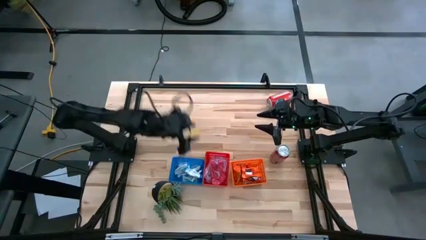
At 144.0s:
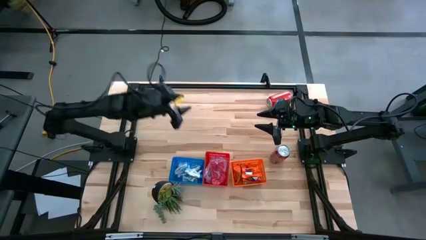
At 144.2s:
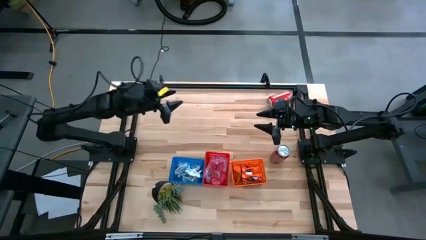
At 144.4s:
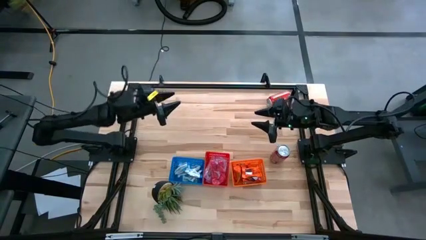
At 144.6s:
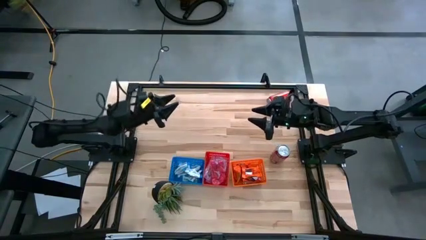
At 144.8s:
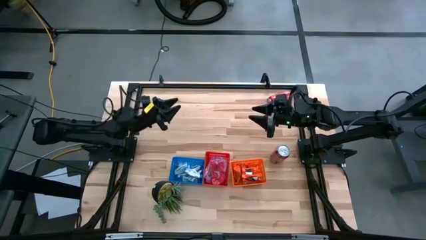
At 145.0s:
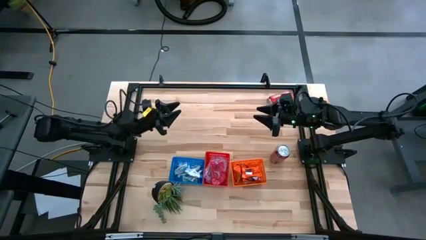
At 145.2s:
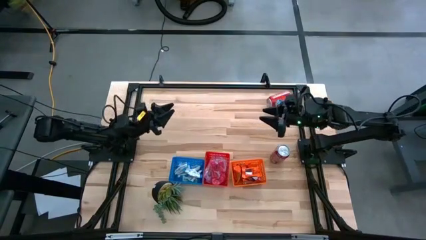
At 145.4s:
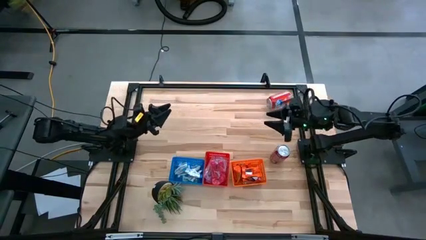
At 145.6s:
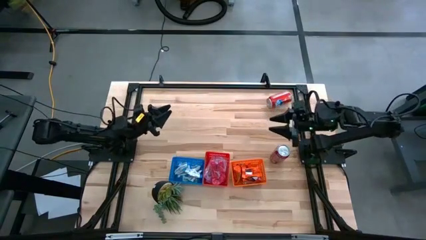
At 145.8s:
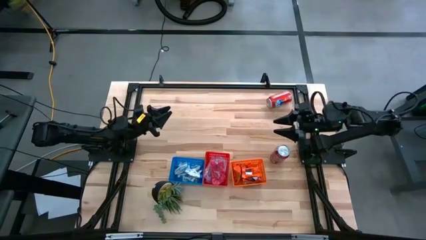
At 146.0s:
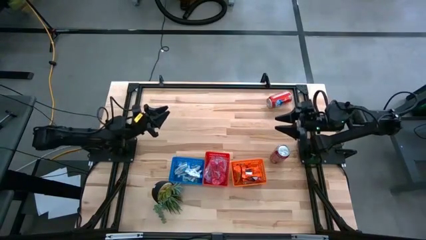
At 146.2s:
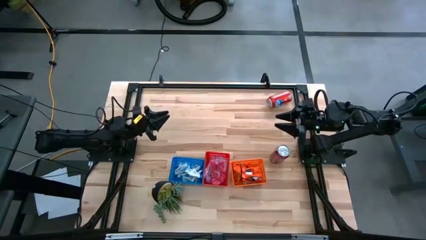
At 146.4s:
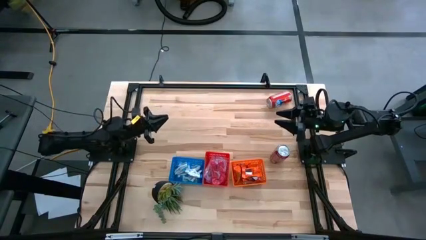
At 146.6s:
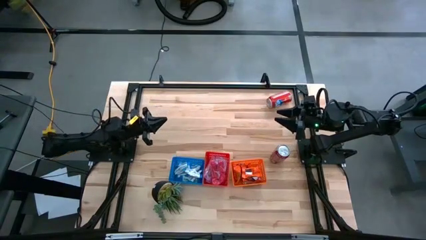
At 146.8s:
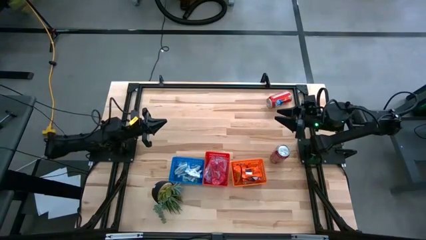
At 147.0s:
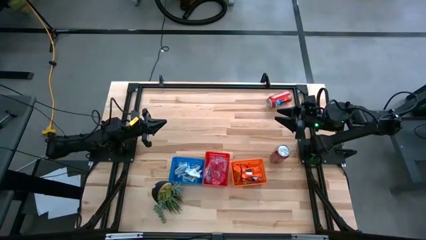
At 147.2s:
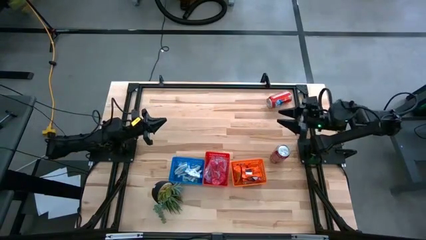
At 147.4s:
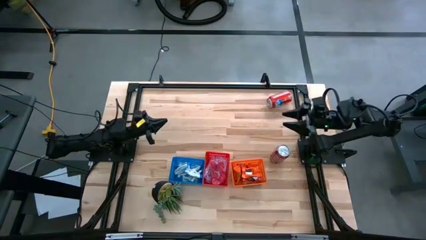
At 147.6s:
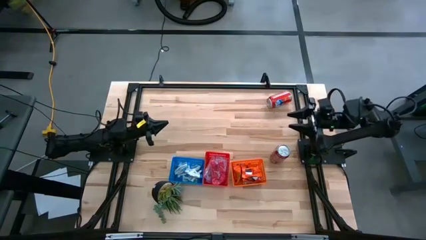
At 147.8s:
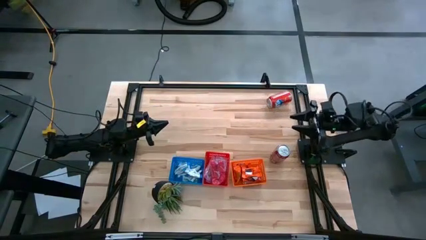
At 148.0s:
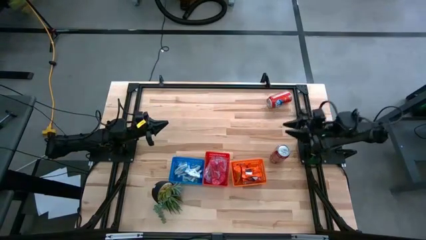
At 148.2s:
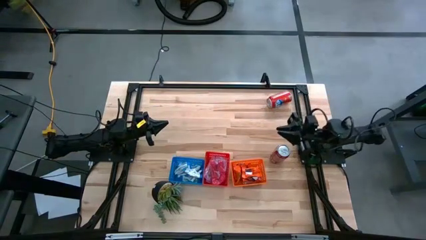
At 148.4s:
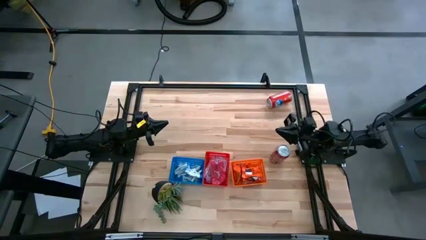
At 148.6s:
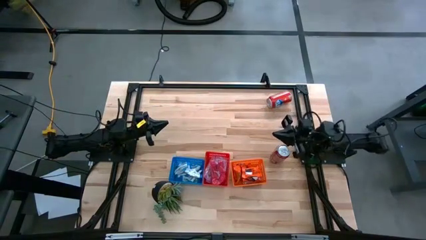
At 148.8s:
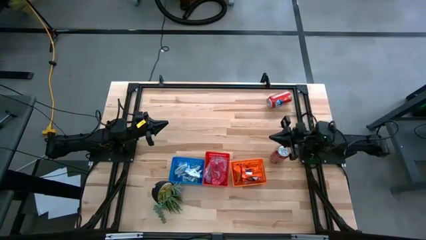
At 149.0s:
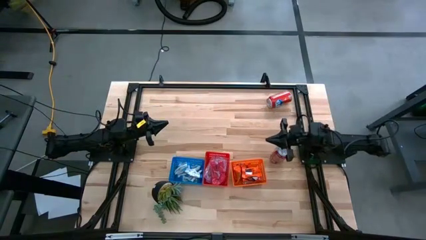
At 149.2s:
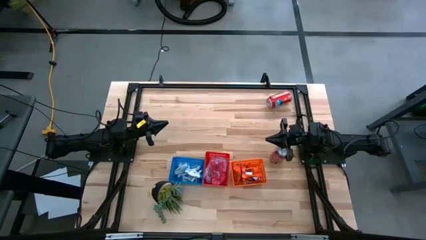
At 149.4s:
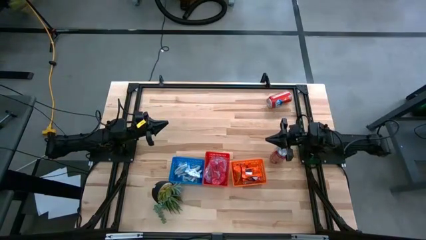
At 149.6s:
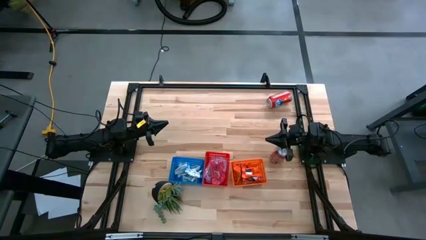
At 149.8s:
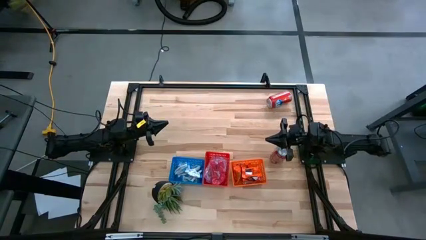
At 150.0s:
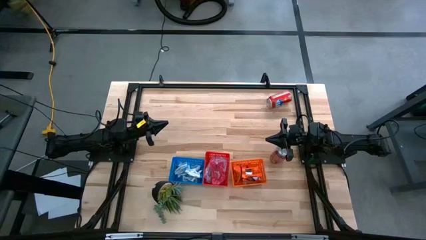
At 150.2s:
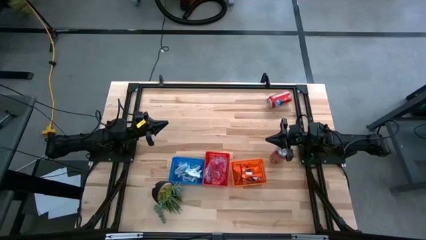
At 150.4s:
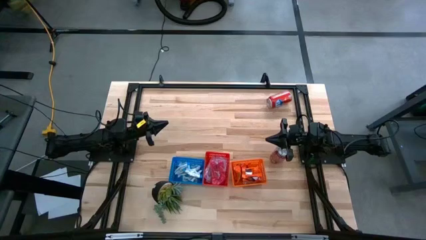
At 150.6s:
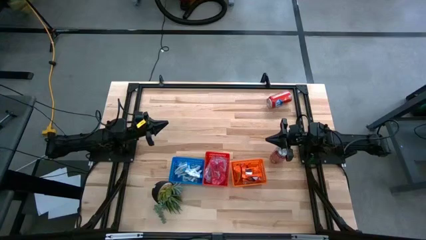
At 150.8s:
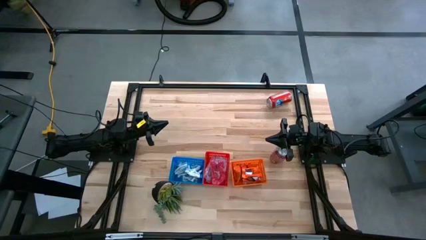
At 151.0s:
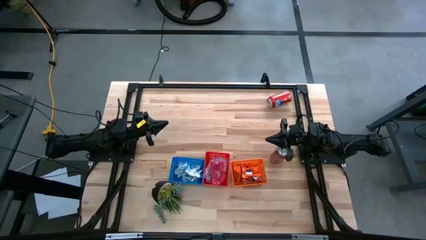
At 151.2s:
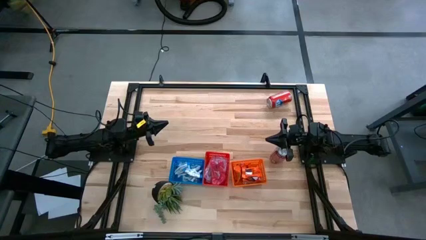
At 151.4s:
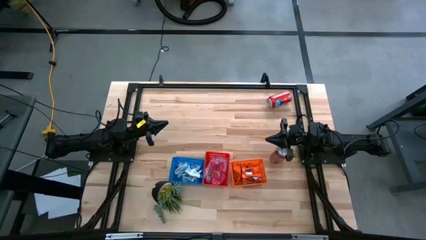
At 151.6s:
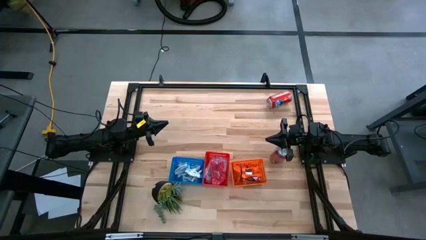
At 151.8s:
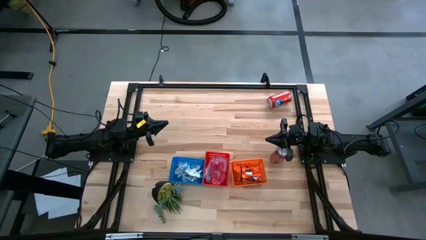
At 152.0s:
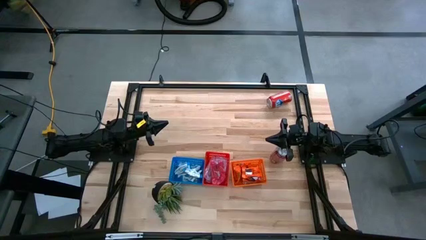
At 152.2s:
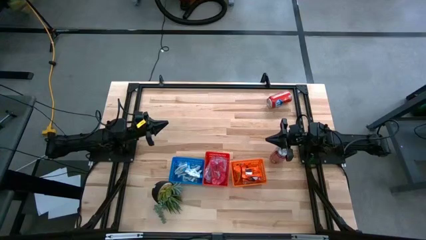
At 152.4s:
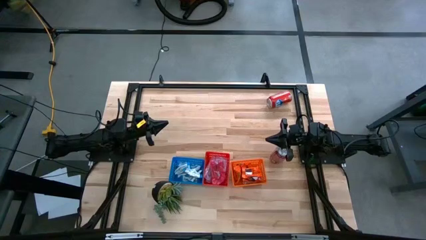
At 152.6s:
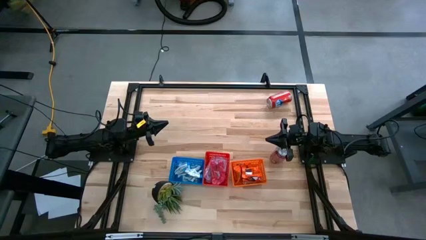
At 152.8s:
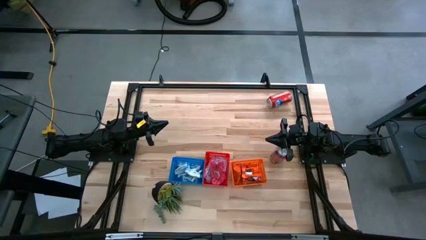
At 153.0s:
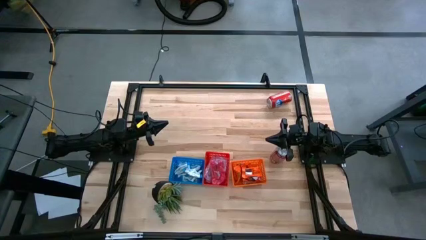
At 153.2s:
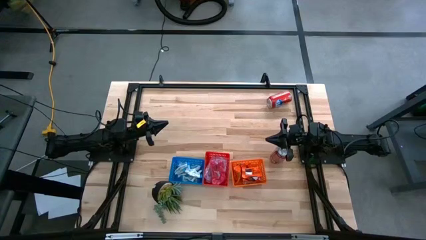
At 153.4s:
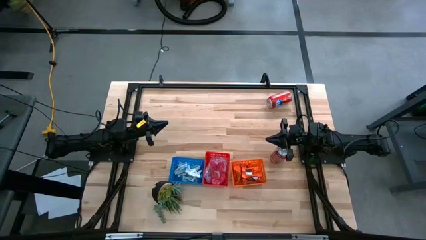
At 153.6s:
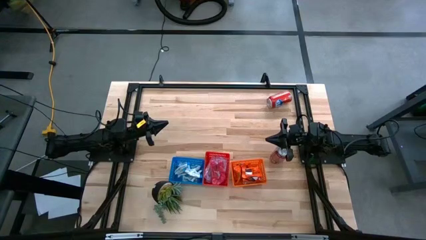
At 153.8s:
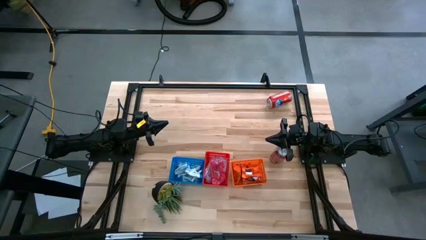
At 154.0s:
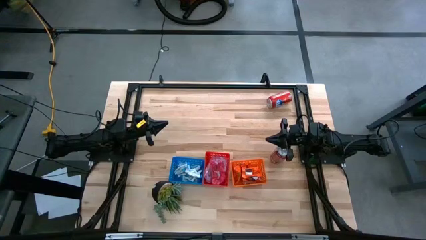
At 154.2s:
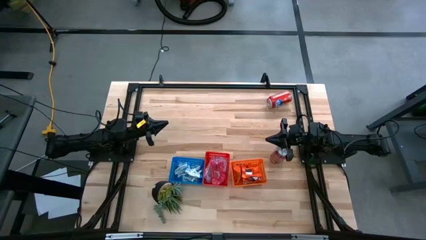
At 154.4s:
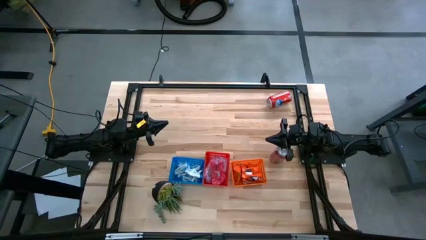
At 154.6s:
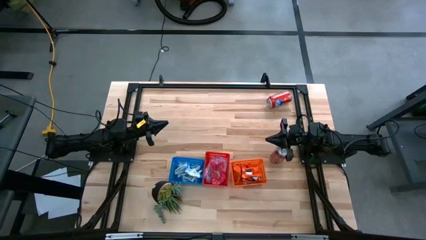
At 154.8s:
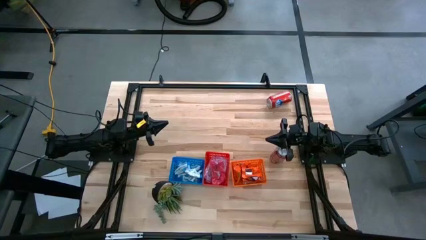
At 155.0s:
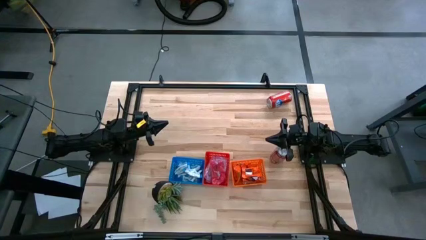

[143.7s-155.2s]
Task: Sort candy
Return to Home Position

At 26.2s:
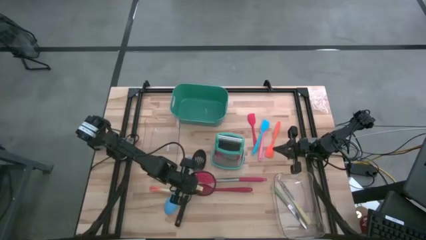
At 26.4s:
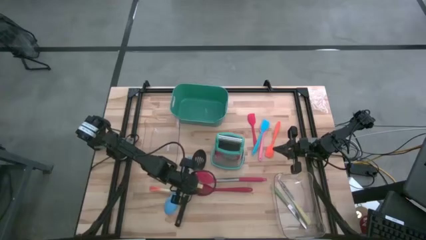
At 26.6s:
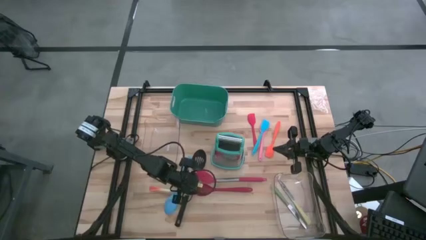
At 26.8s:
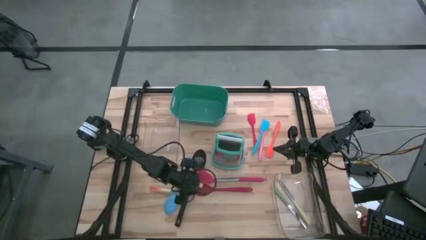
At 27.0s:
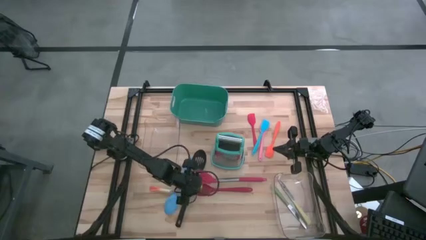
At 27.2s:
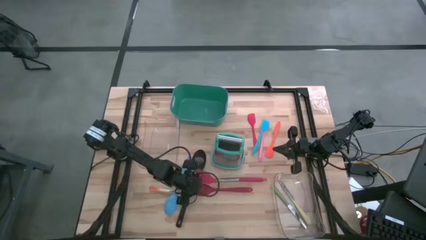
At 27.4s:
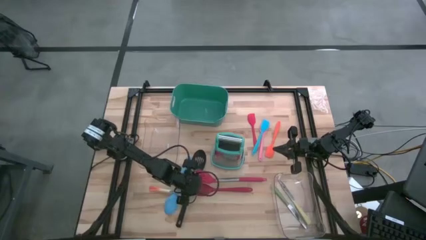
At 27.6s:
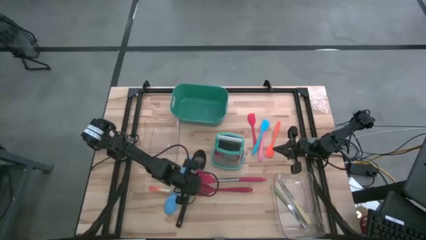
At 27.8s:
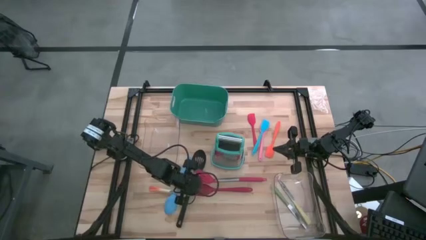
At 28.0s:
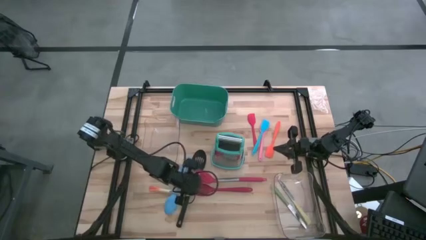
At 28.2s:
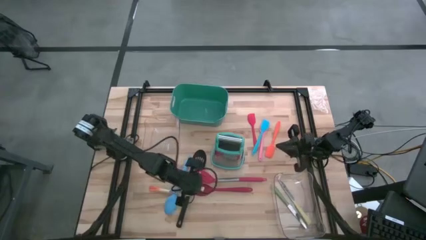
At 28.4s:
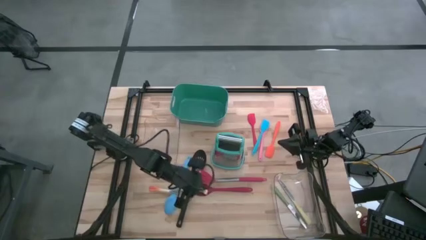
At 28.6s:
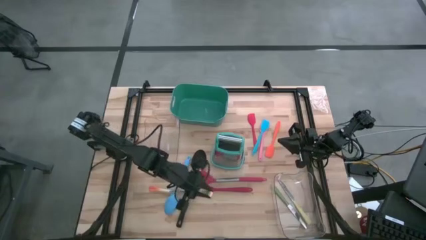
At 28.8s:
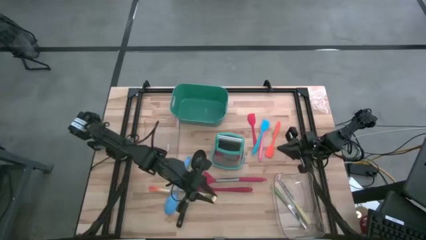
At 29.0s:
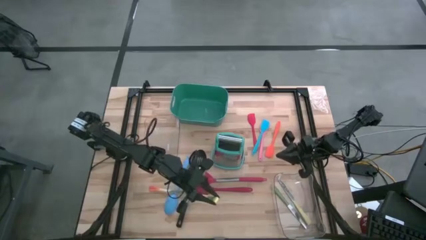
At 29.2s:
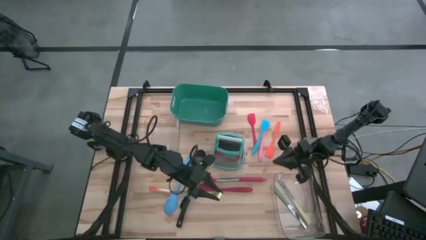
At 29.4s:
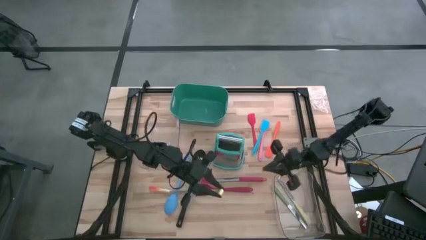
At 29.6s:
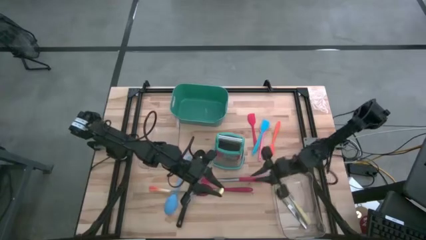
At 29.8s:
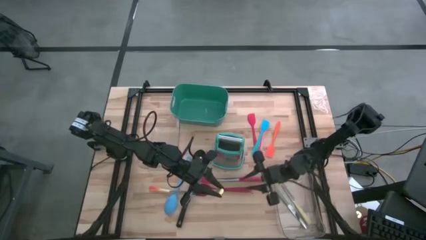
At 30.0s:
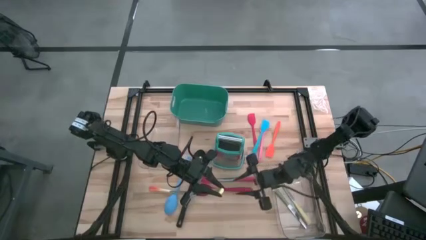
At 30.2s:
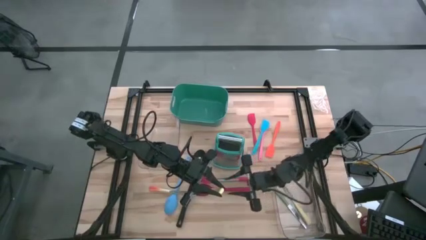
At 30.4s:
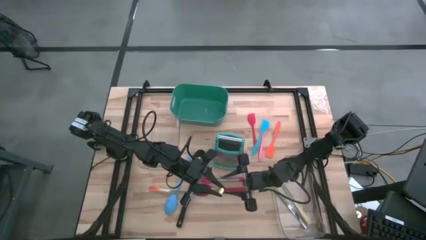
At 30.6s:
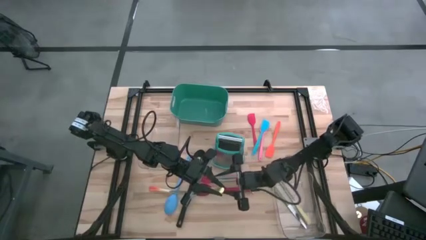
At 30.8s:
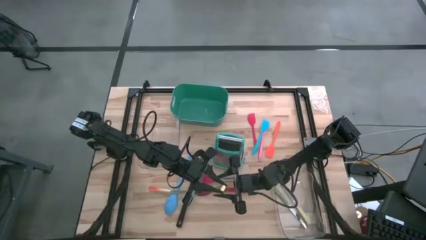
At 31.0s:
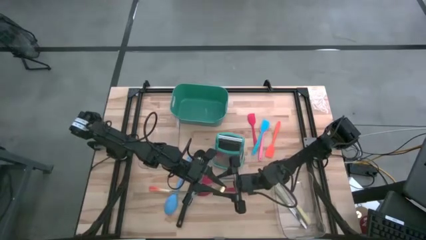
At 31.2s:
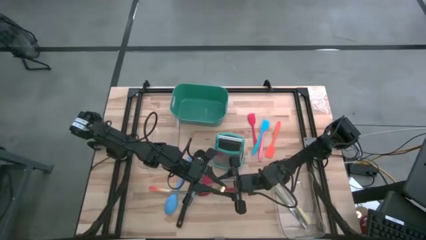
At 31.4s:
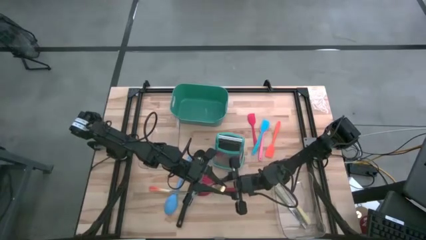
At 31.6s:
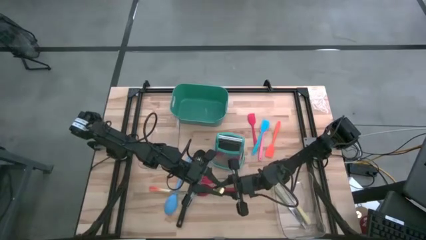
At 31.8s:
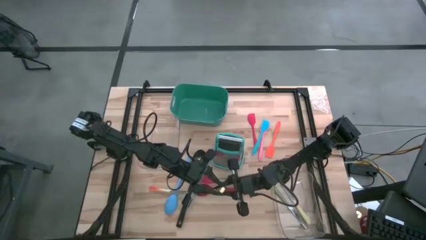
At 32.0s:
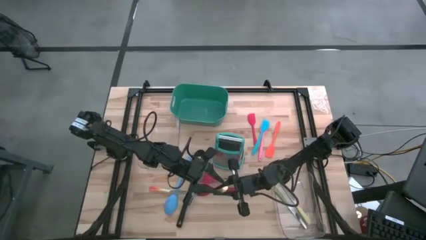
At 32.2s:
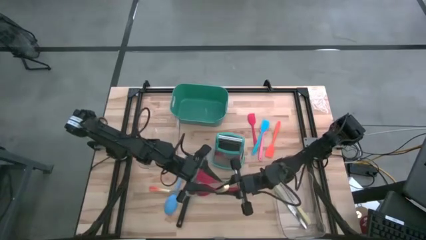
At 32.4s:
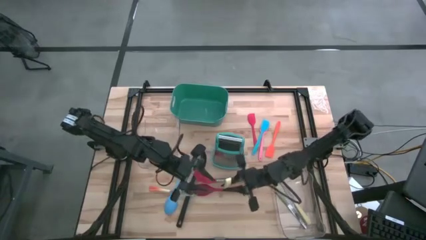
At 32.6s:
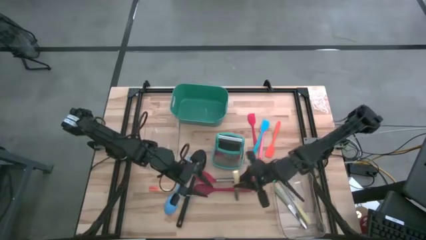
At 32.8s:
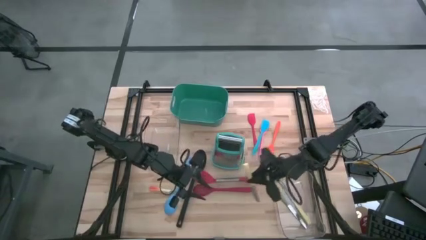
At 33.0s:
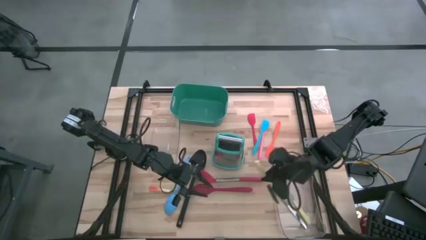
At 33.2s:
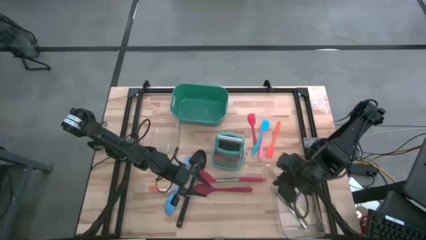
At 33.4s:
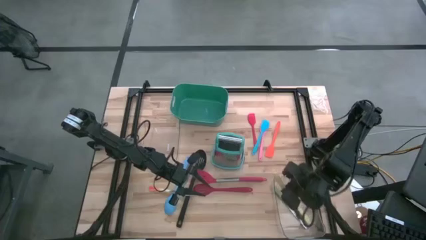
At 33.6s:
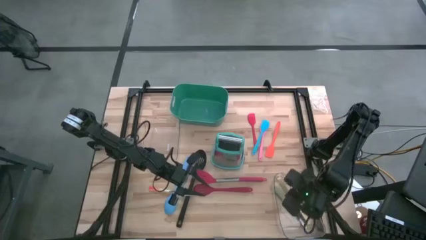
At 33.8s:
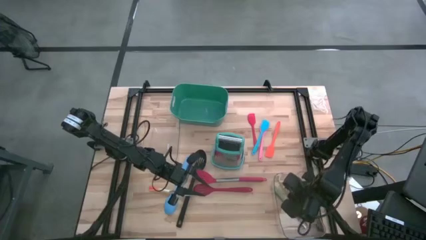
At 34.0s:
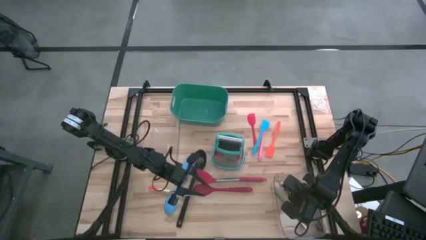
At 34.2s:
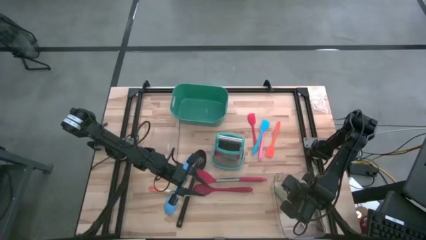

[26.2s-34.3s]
Task: Pick & Place Kitchen Items
Put the yellow table knife into the bottom transparent bin
